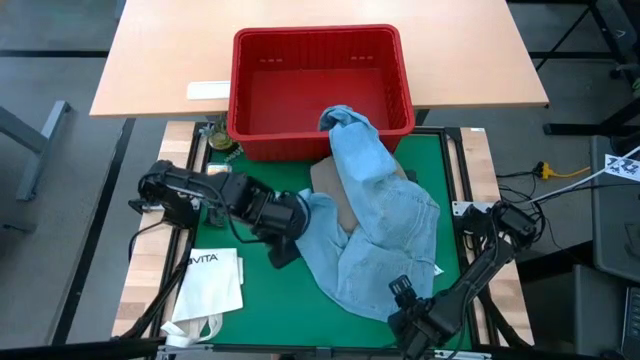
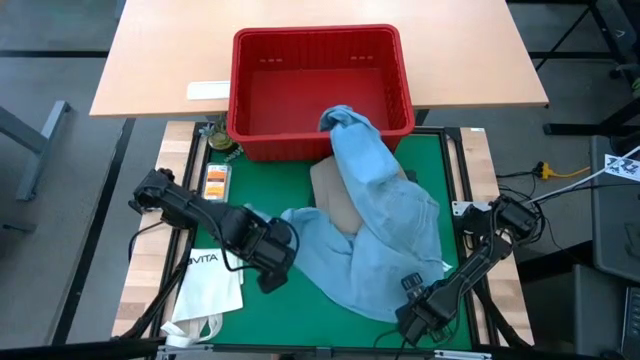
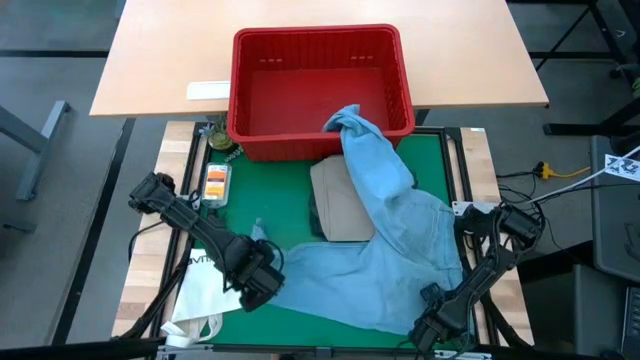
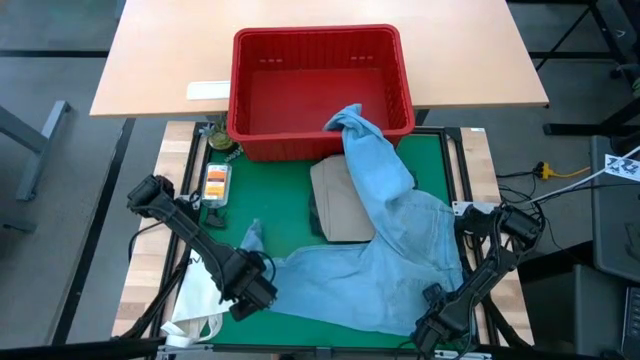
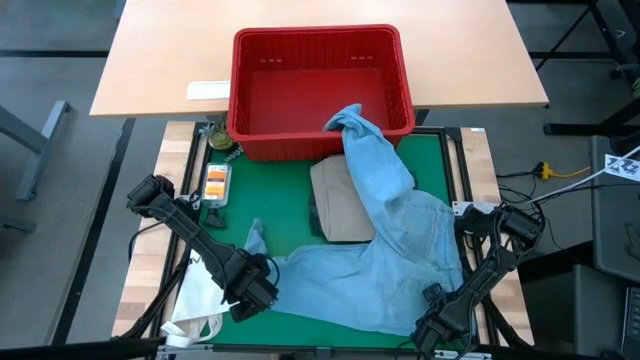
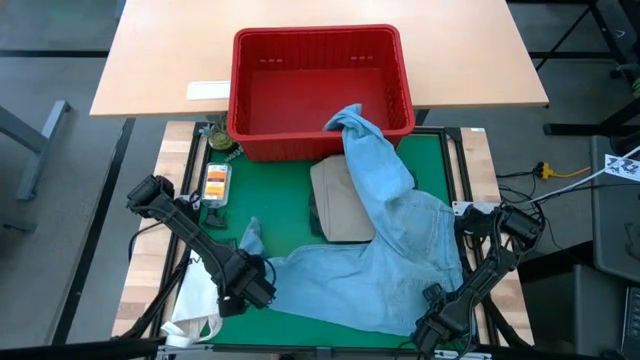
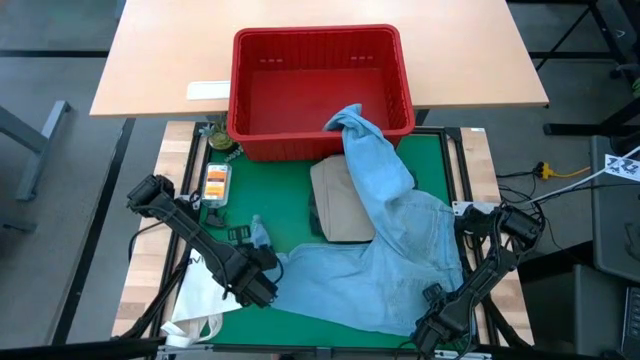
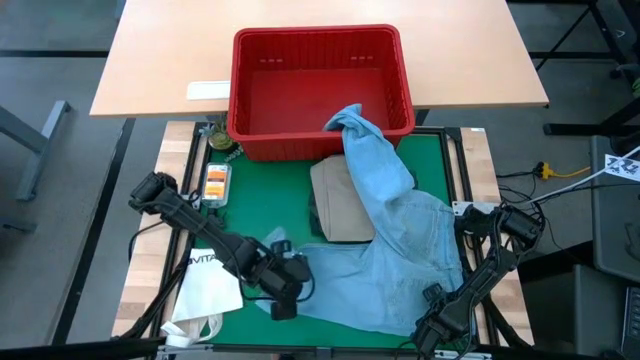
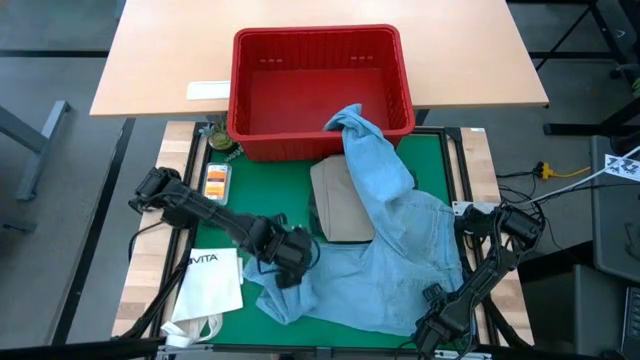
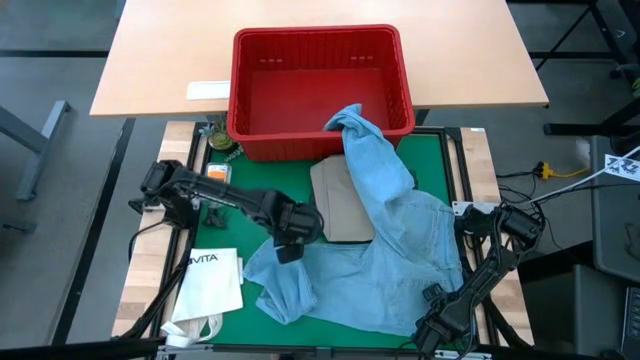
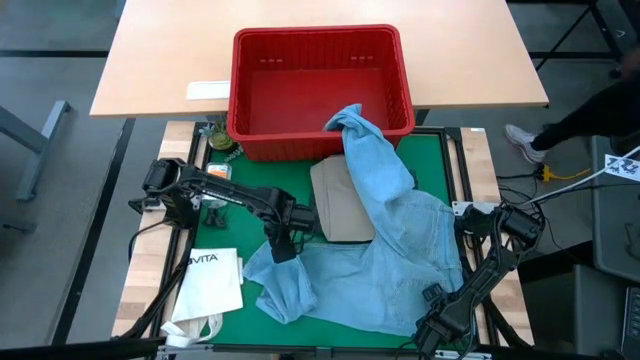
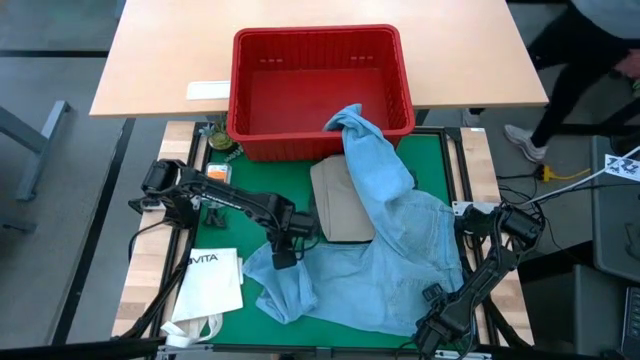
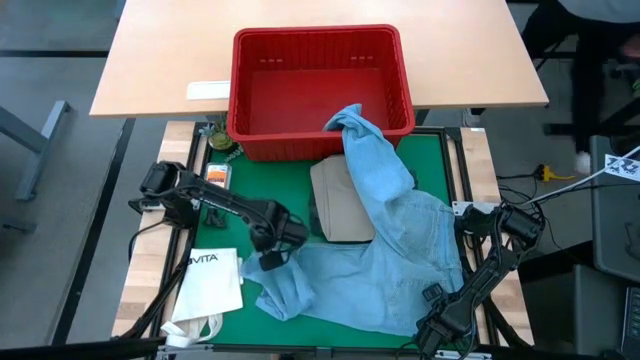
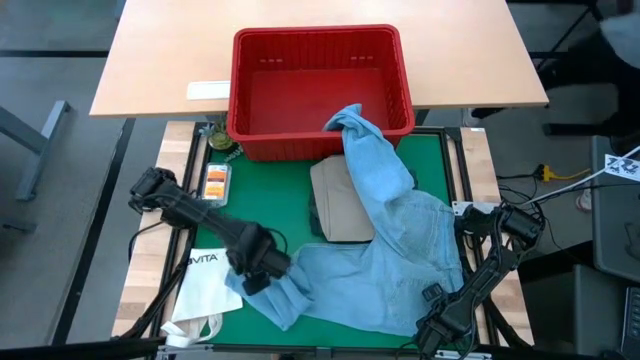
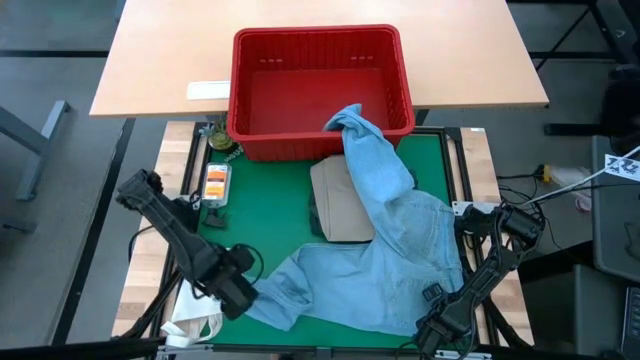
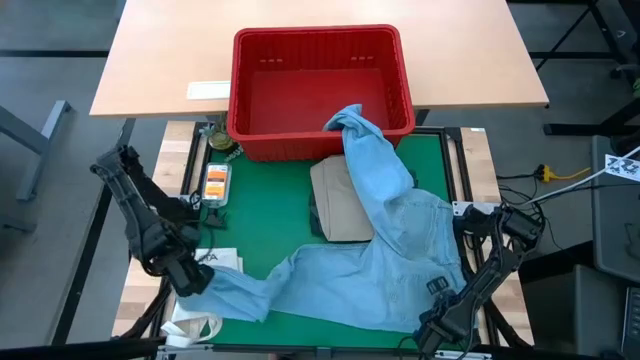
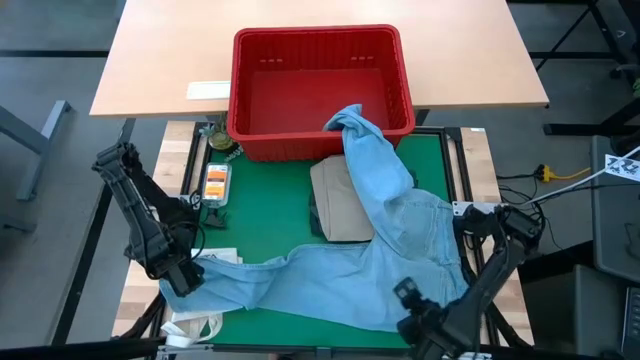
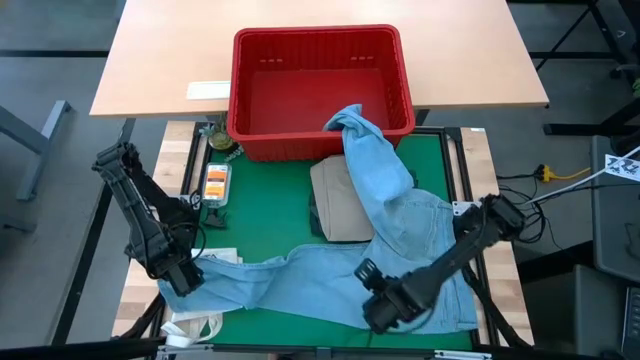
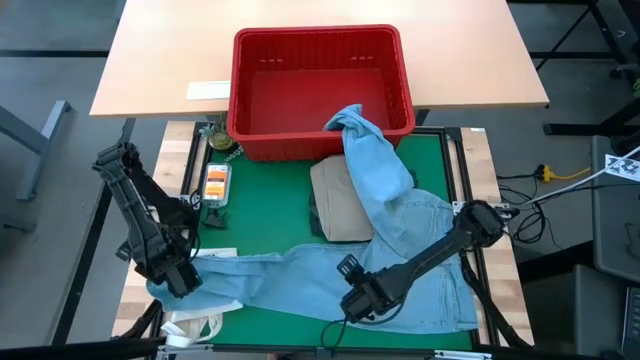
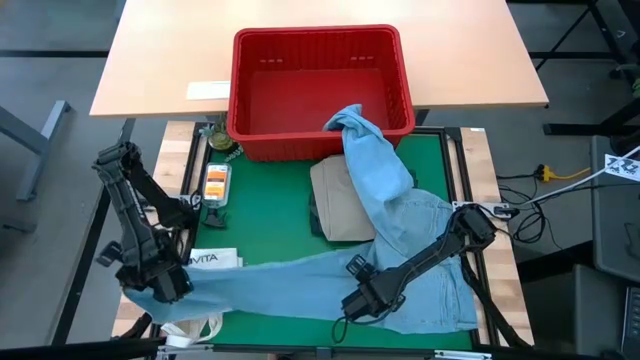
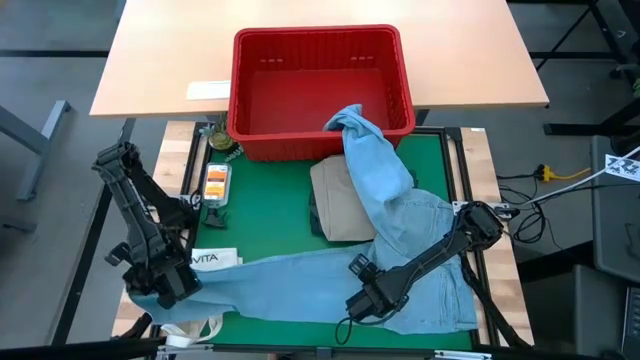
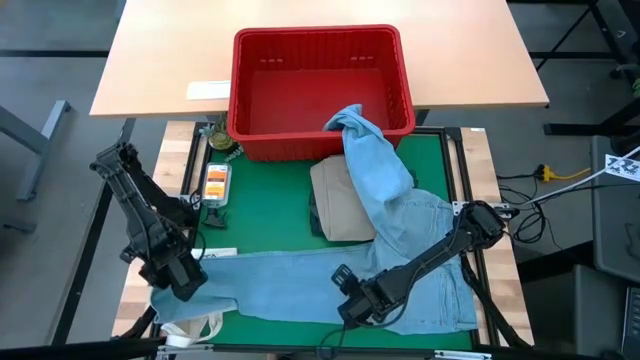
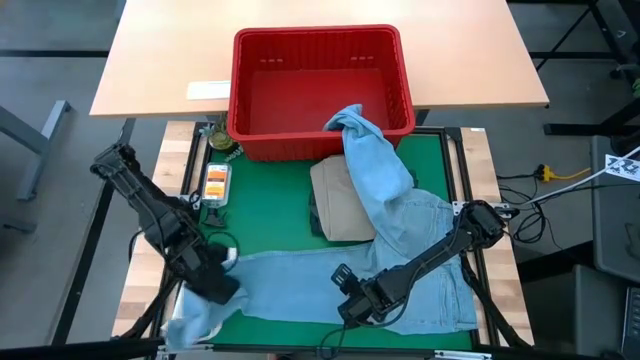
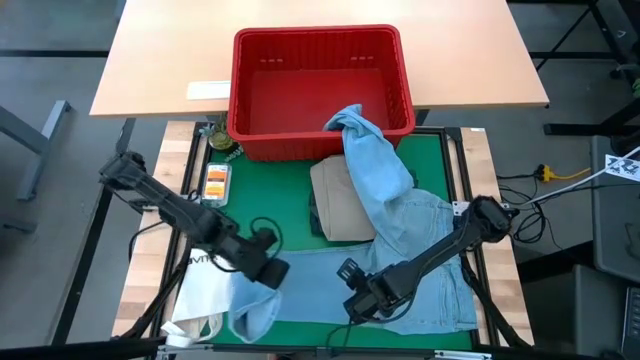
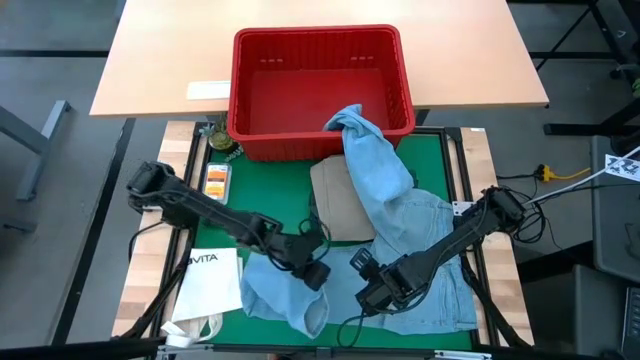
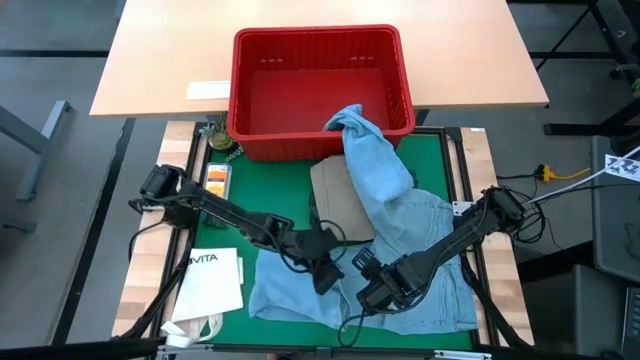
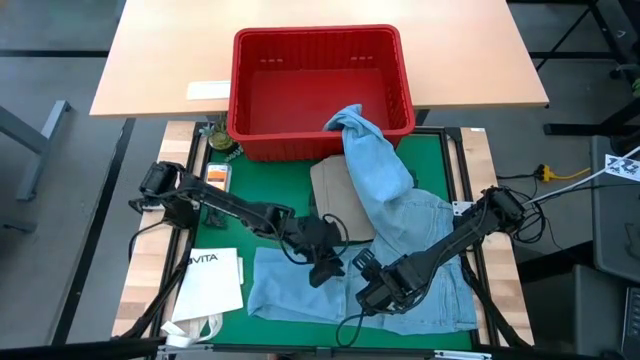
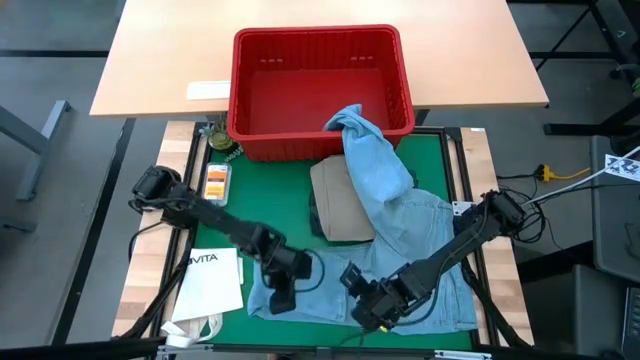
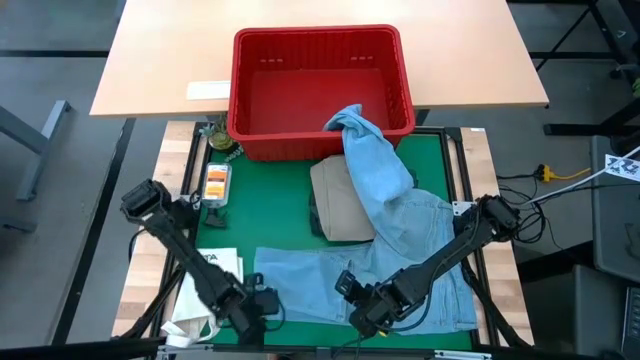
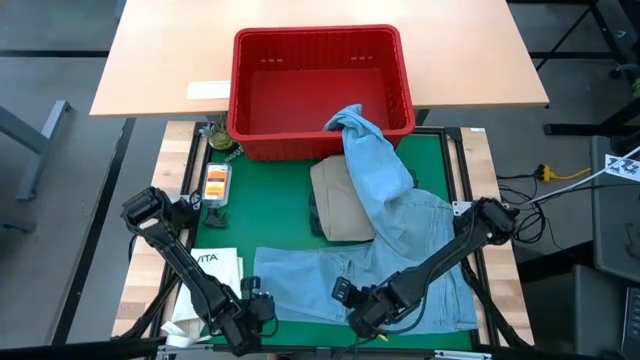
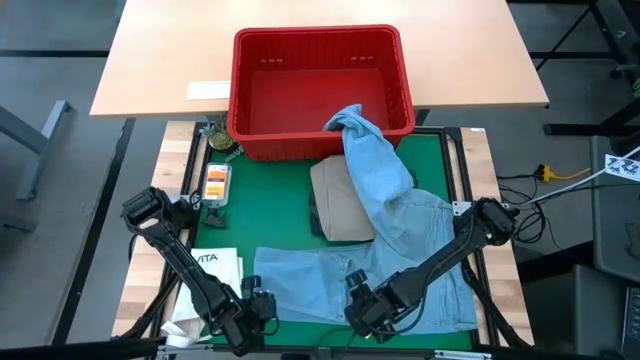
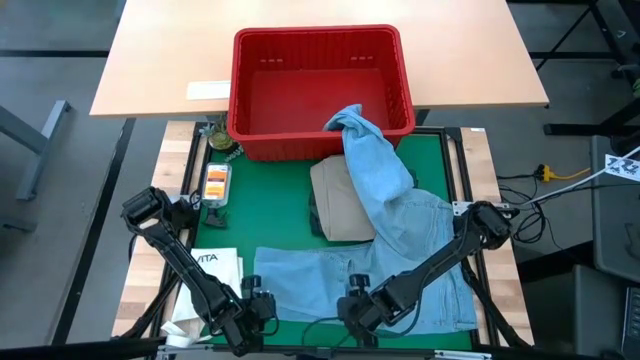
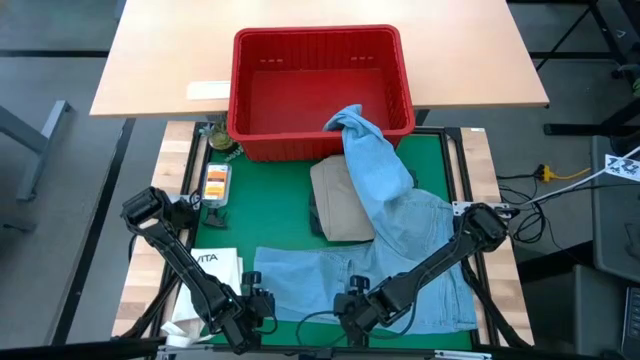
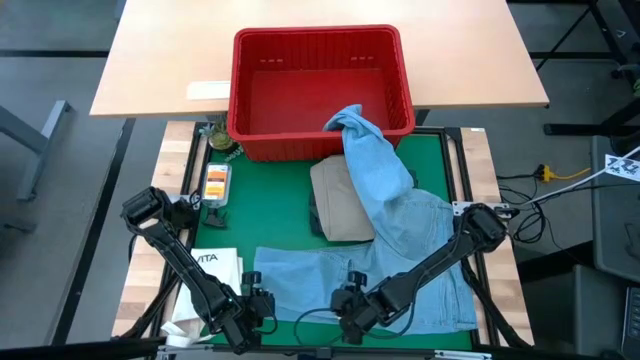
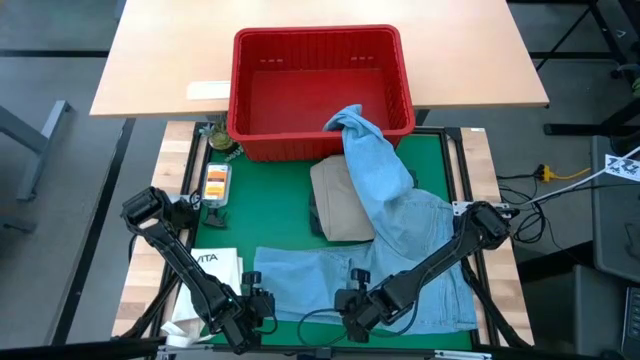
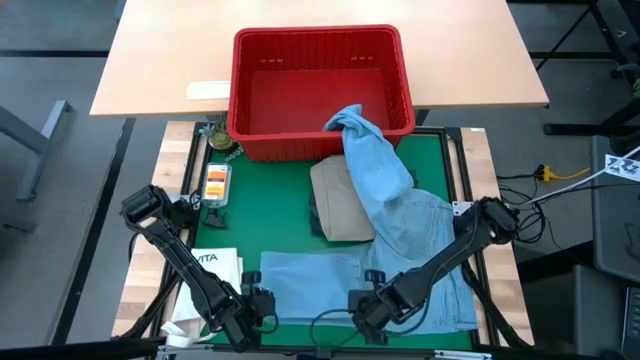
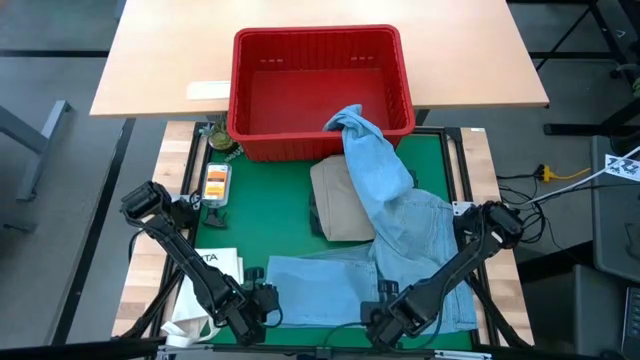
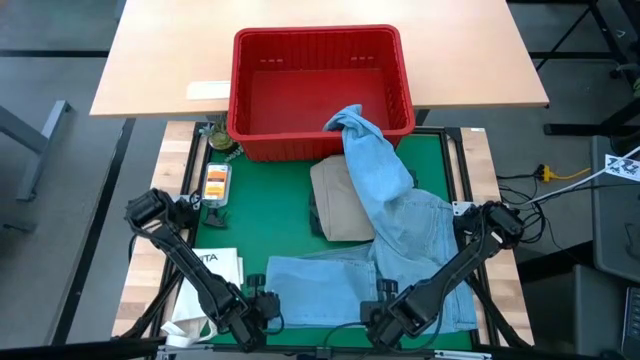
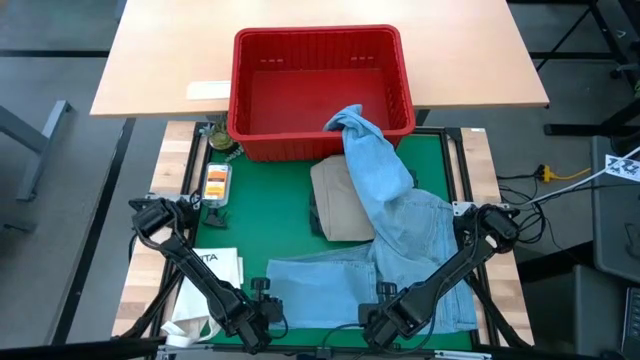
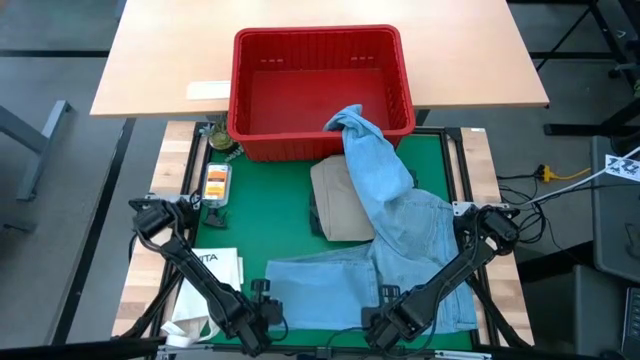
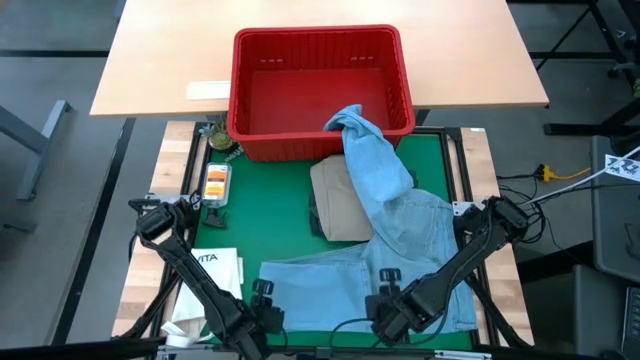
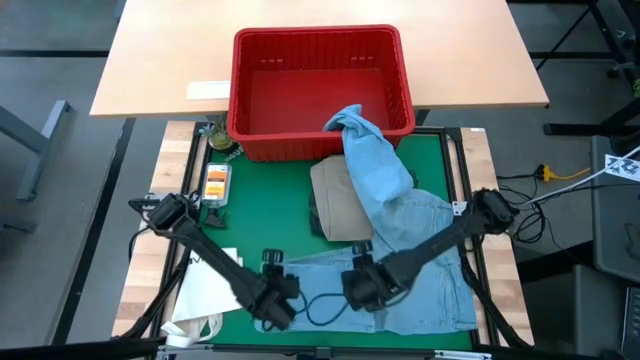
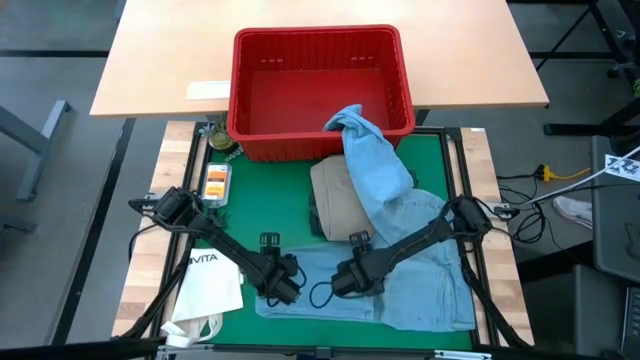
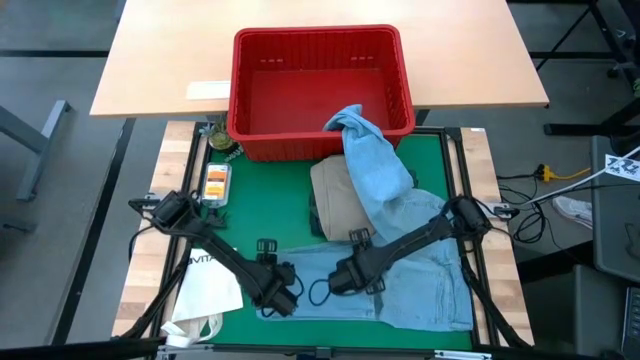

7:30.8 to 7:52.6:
Task: Fold Laundry from Bin
Fold the light blue pants
